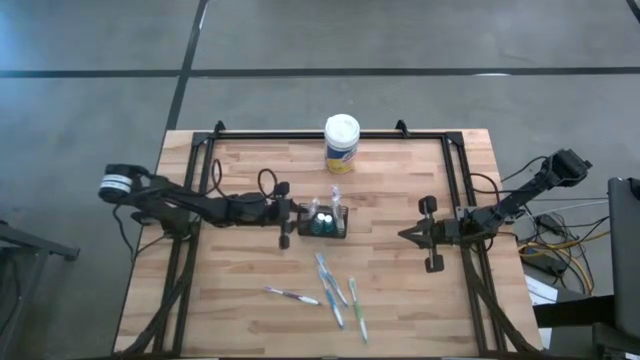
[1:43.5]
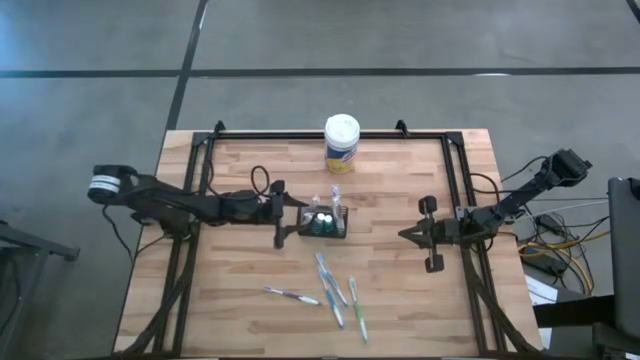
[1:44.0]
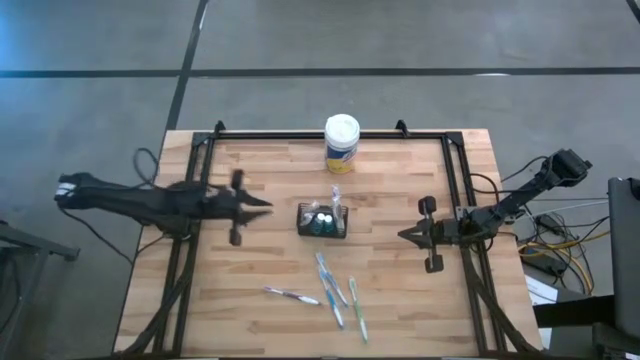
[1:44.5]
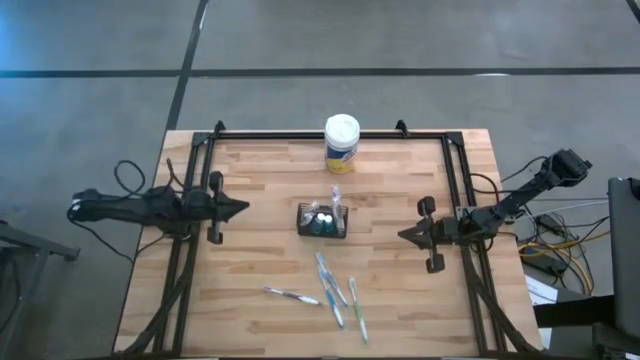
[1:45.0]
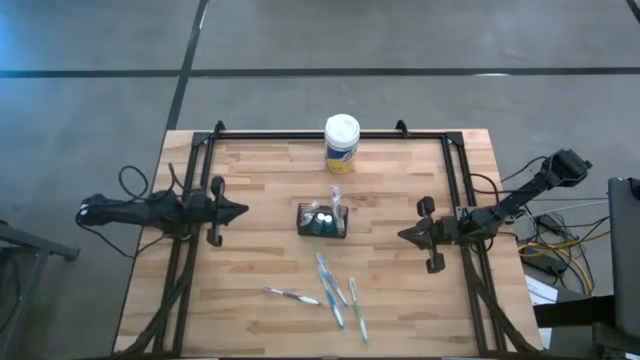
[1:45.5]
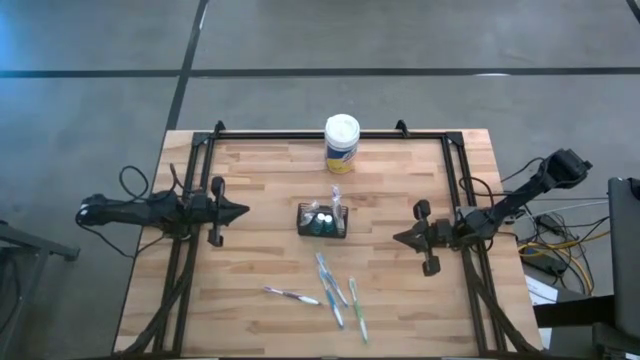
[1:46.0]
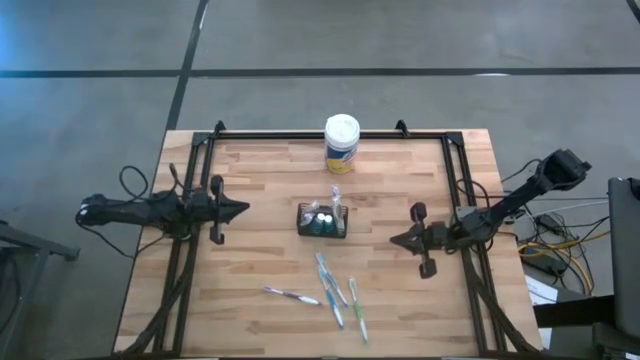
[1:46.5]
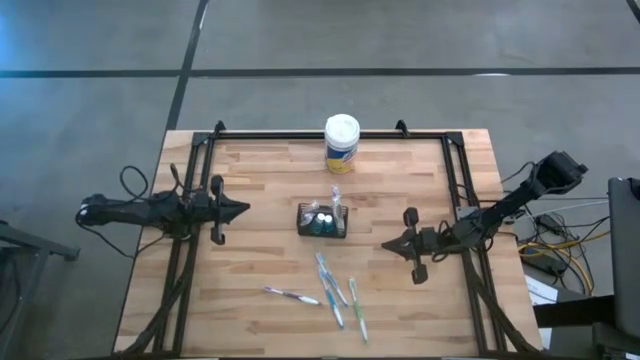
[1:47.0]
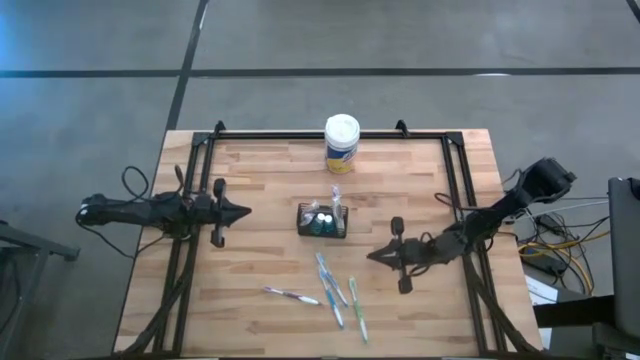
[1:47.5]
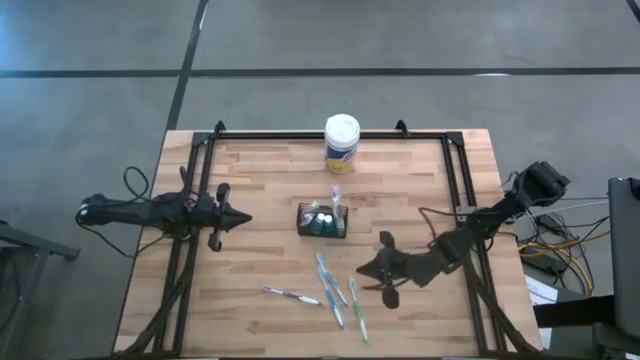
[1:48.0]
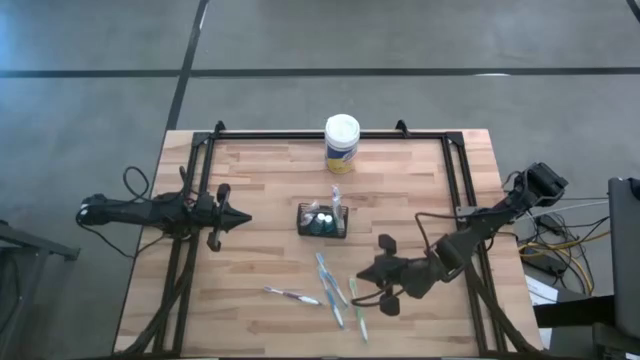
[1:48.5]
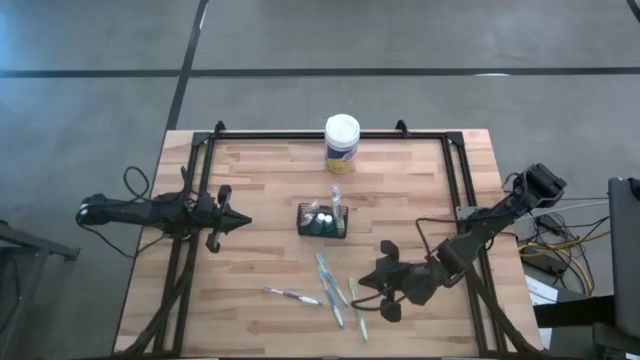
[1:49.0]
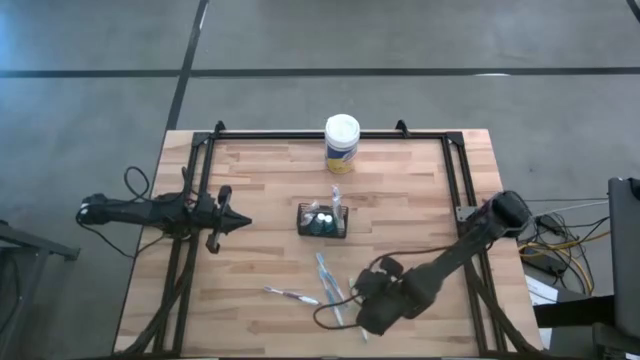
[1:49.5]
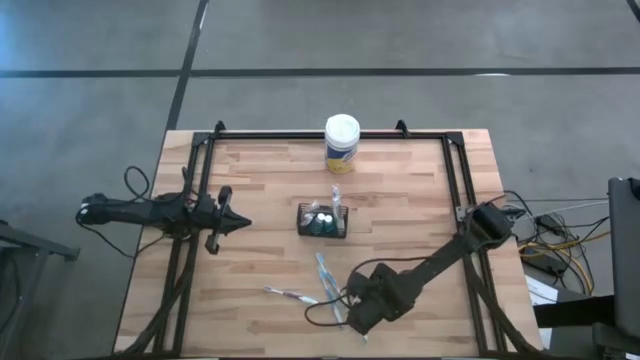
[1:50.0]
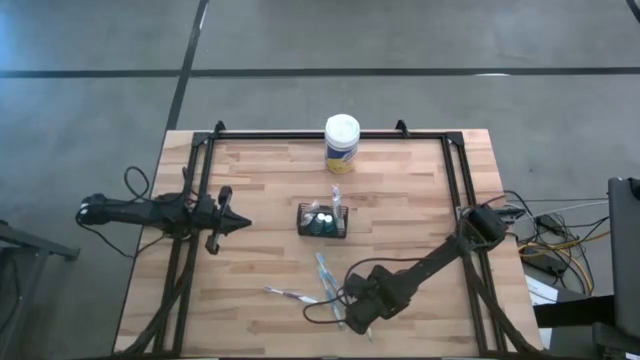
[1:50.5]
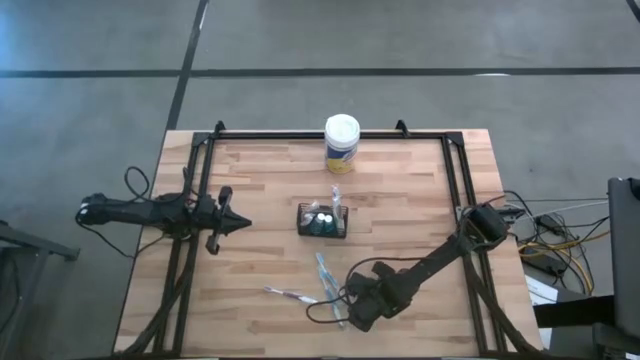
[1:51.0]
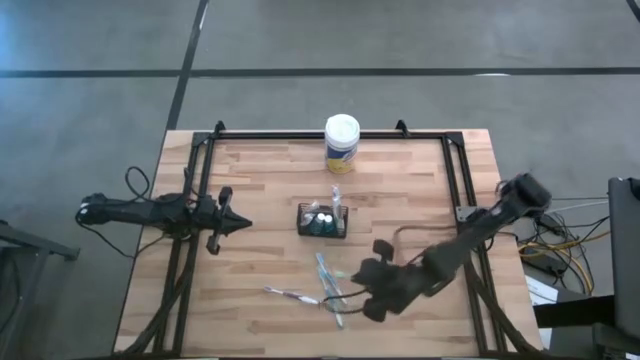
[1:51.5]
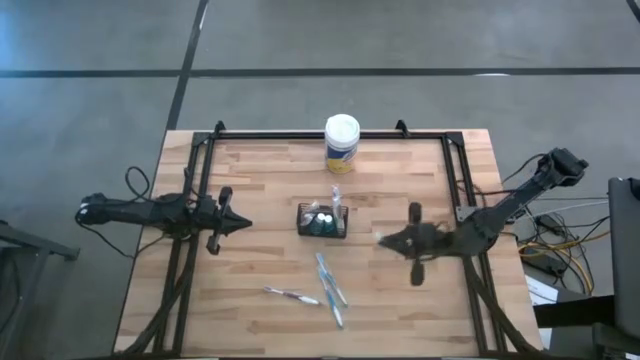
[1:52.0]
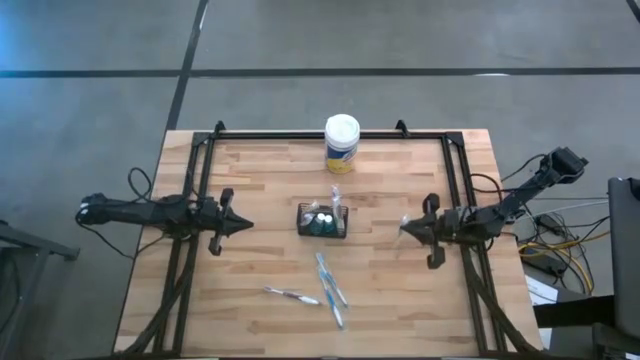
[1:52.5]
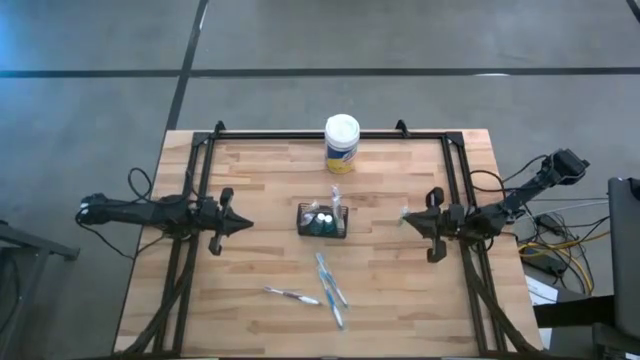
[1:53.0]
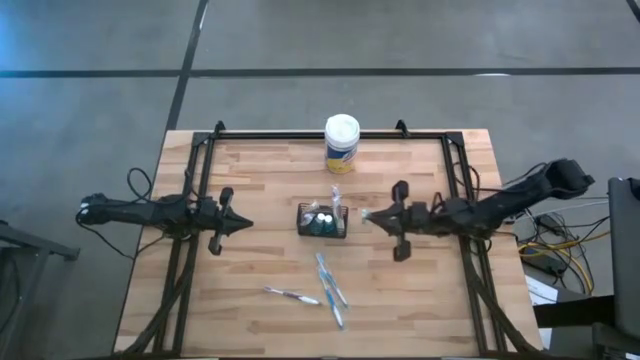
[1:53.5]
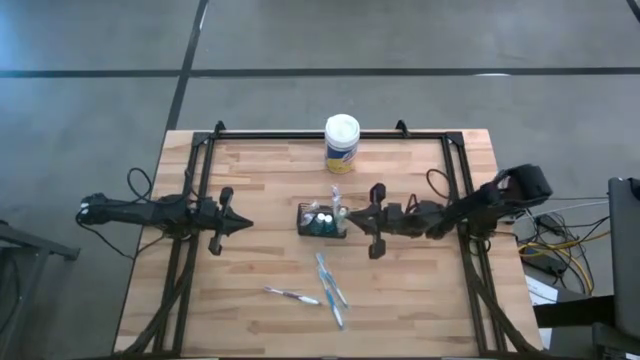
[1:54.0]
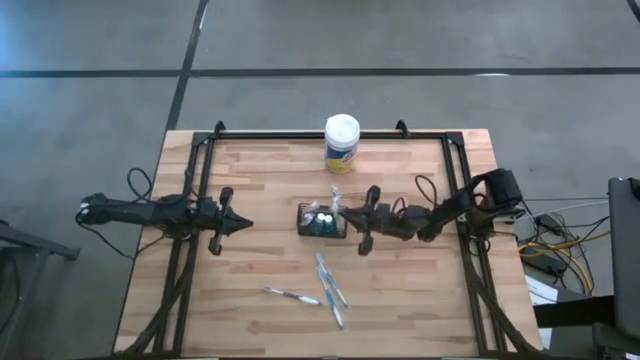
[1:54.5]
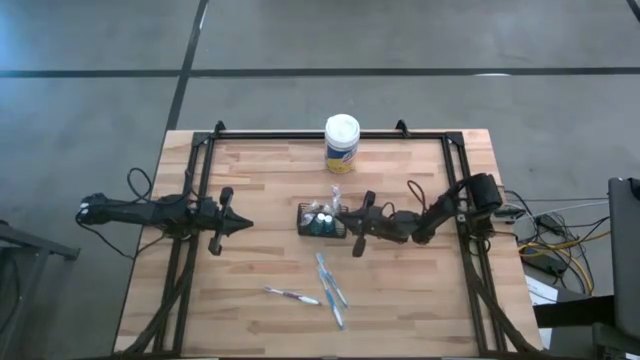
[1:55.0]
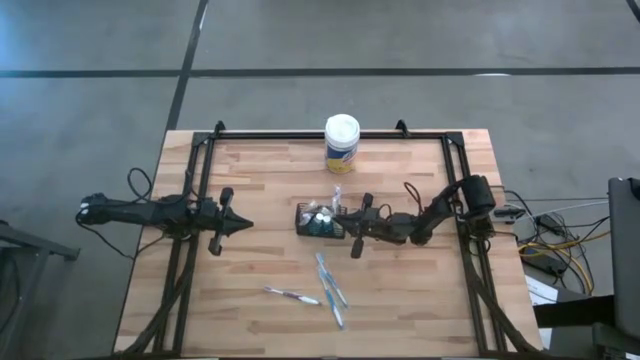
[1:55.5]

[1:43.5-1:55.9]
Task: Pick & Place toothbrushing station
Put the green toothbrush into the wire organizer

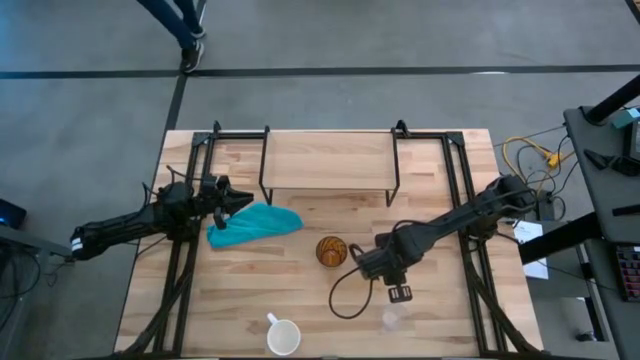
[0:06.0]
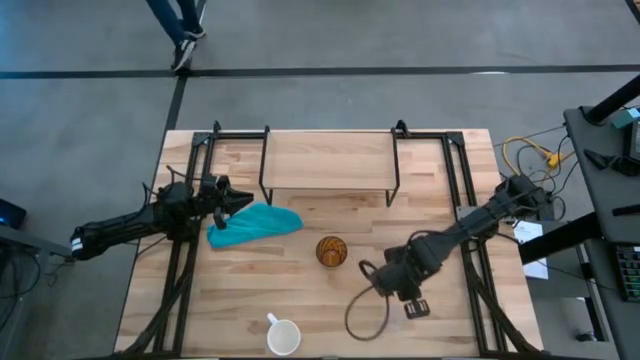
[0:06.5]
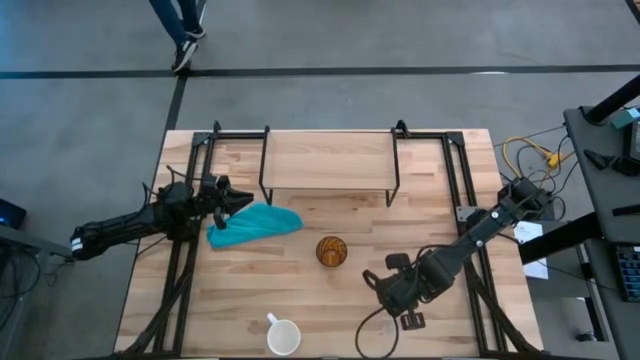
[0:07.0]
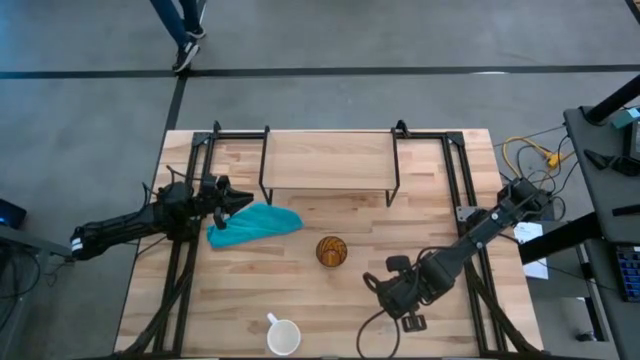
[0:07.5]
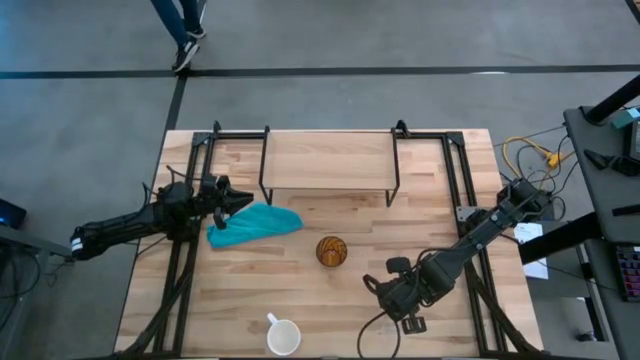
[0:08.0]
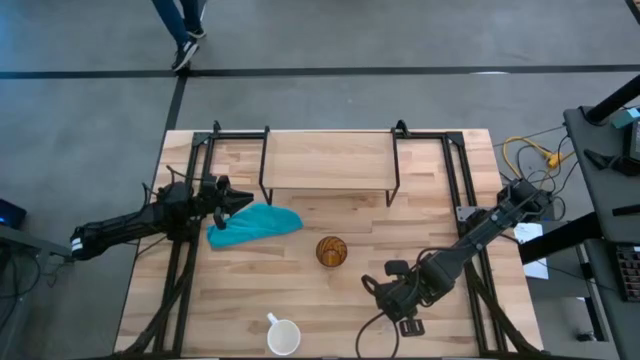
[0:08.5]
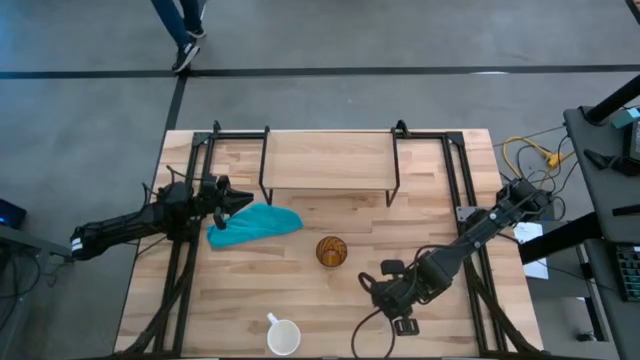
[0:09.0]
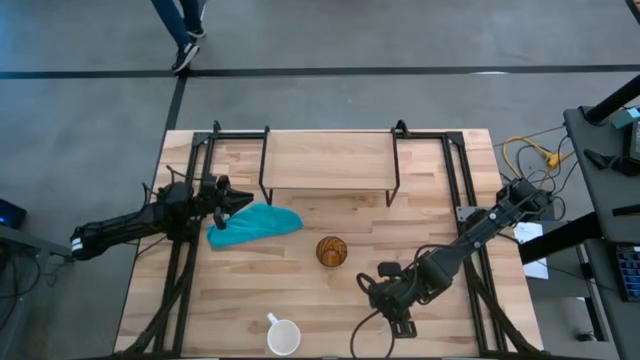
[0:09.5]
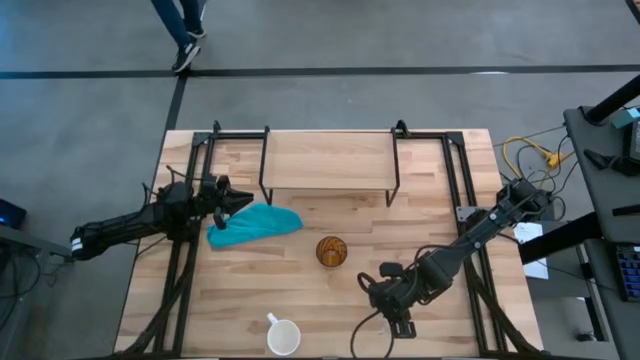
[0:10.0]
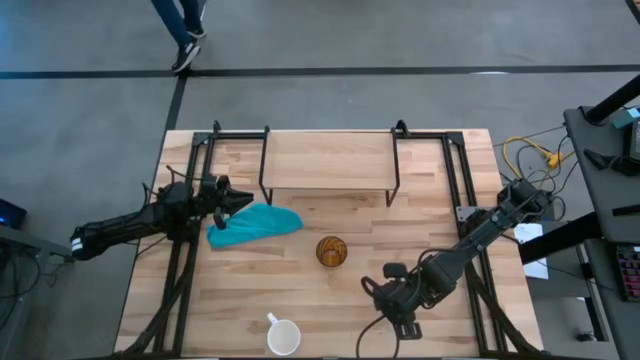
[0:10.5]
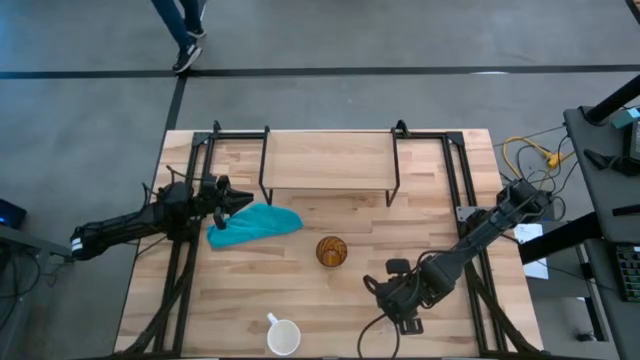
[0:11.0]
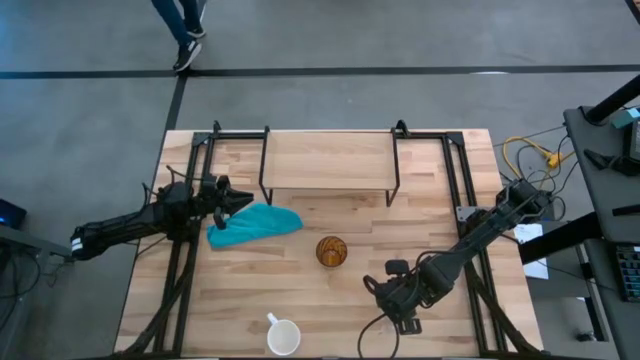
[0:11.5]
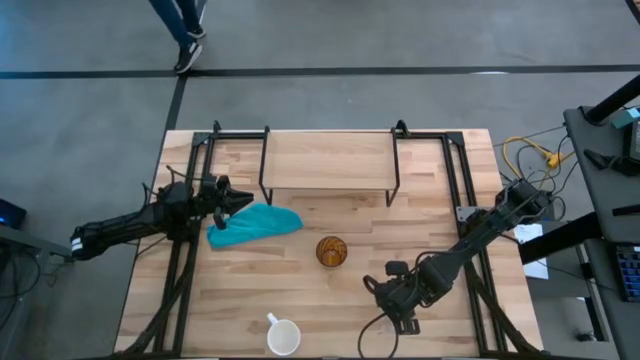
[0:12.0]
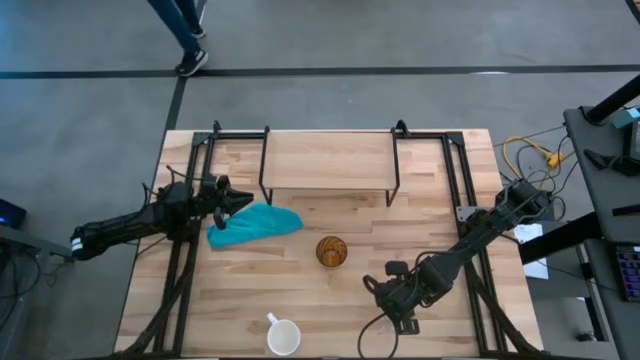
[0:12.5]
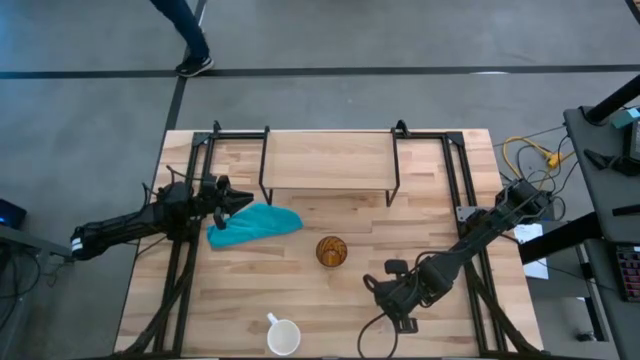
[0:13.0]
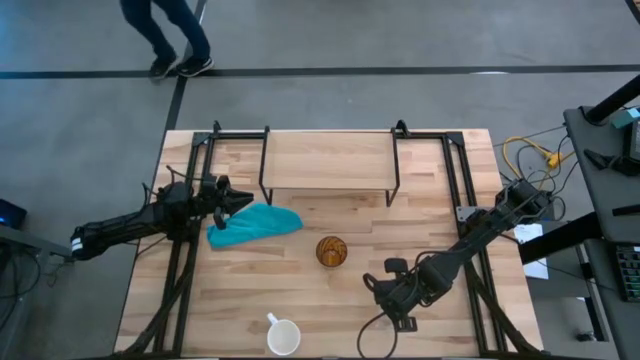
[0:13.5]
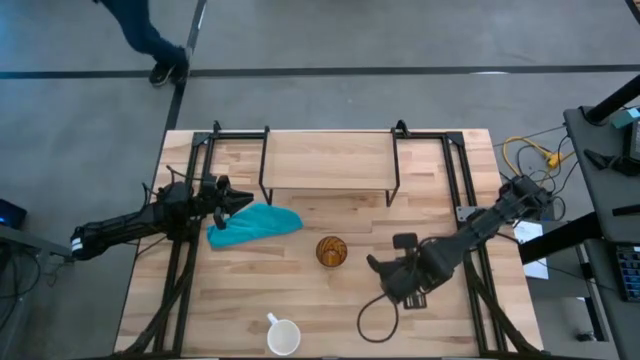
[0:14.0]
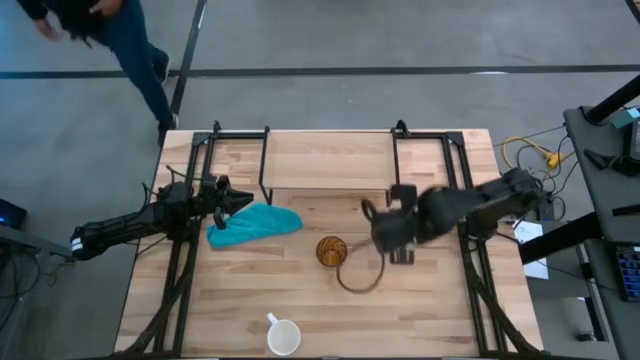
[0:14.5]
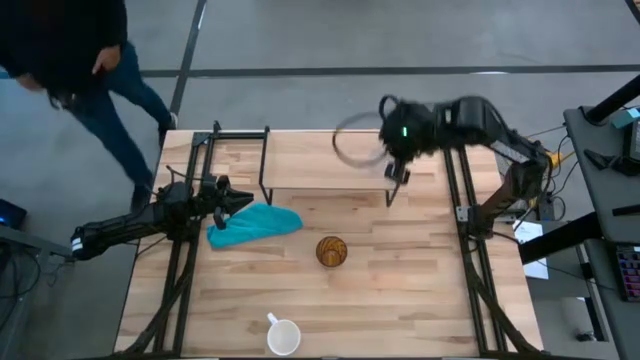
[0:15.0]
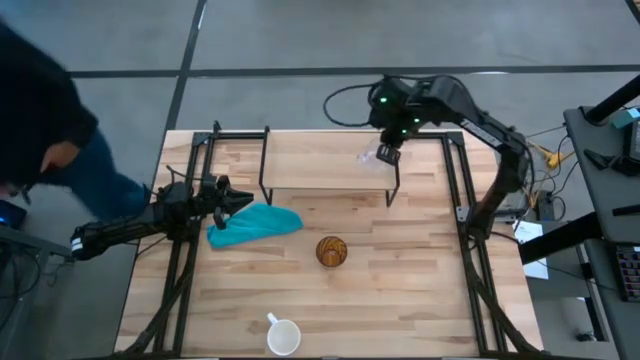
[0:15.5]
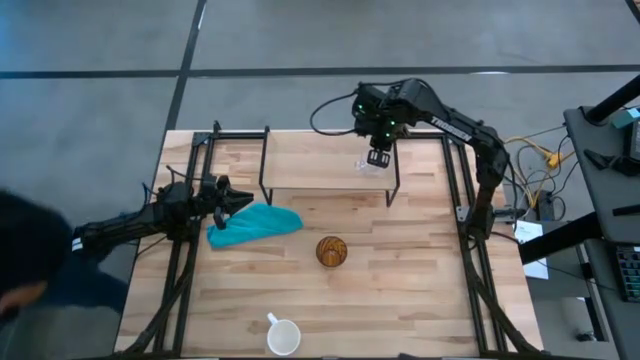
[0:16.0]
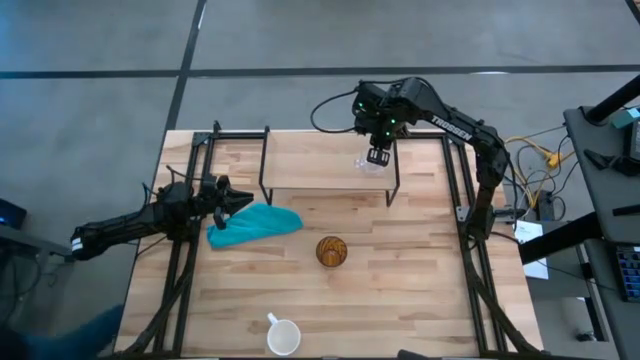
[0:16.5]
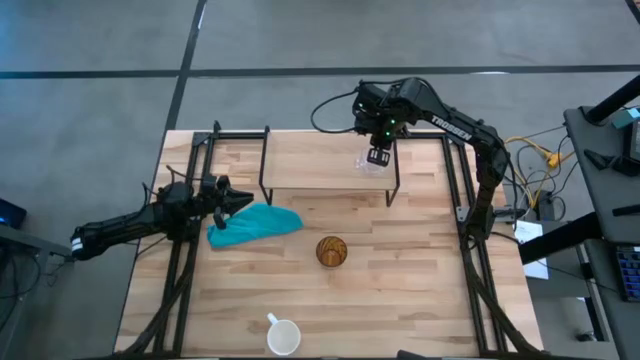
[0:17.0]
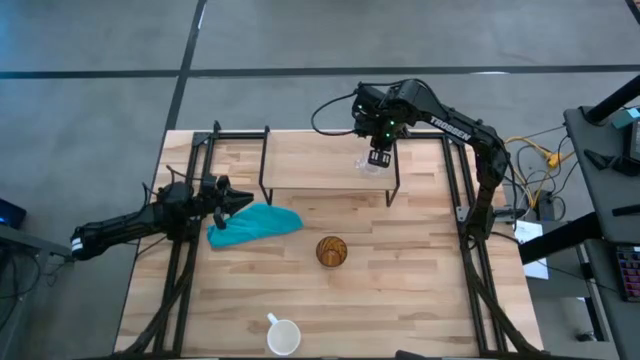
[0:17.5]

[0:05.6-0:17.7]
Task: Stack small to large cups/mugs on shelf
Put the transparent mug on the shelf
